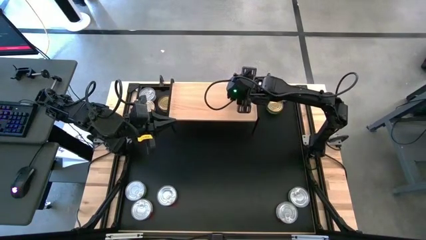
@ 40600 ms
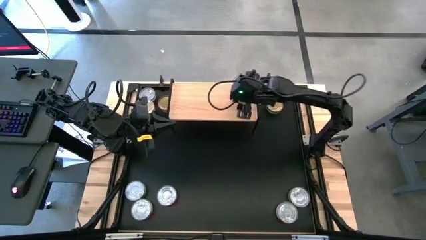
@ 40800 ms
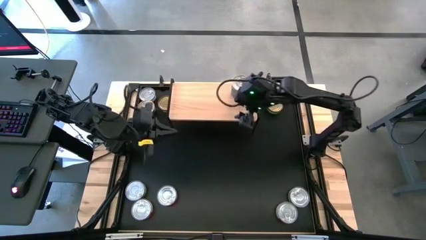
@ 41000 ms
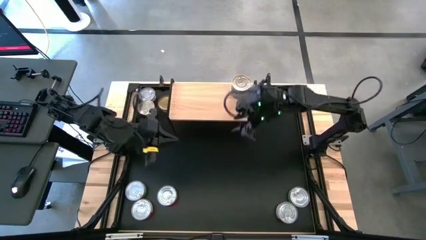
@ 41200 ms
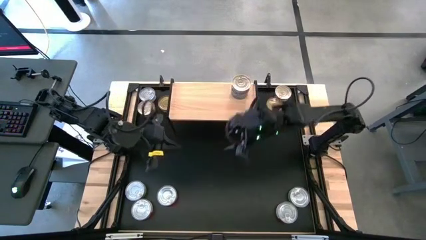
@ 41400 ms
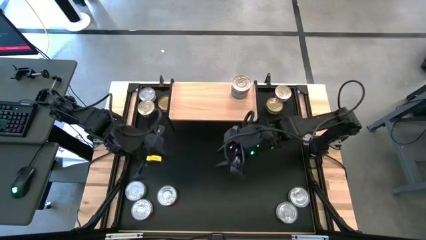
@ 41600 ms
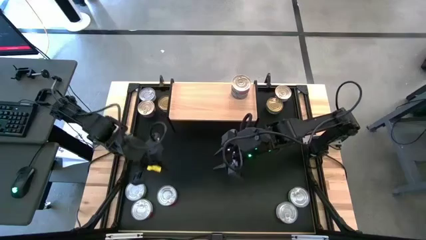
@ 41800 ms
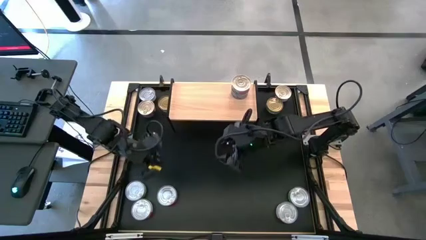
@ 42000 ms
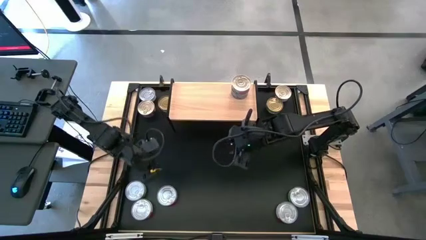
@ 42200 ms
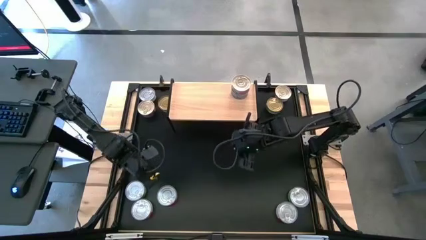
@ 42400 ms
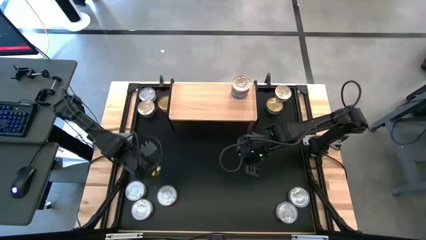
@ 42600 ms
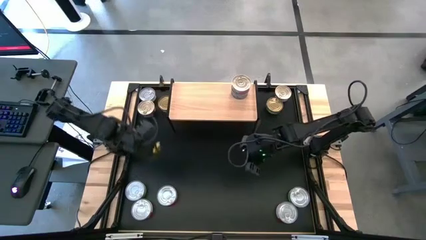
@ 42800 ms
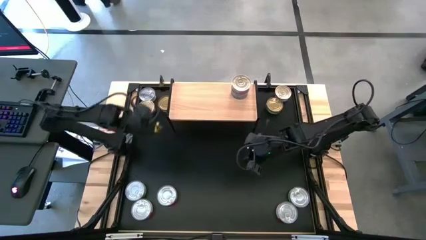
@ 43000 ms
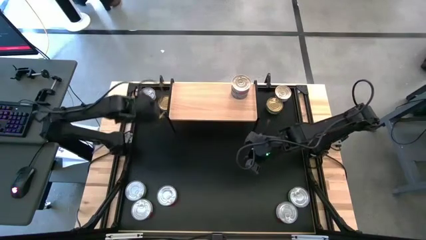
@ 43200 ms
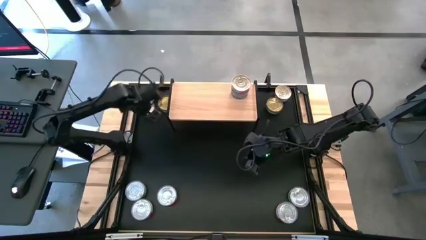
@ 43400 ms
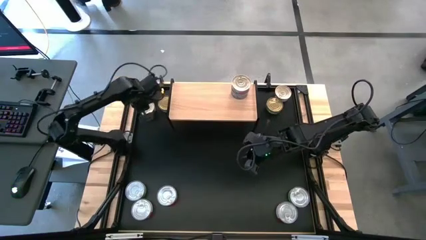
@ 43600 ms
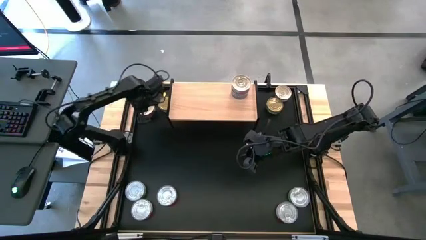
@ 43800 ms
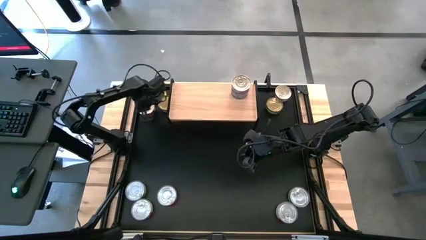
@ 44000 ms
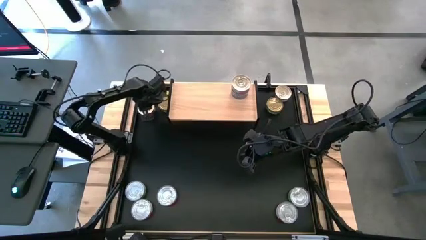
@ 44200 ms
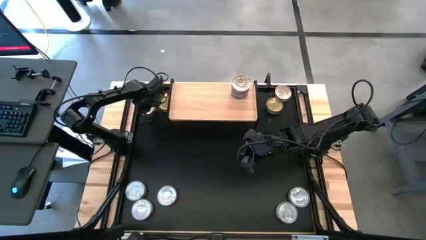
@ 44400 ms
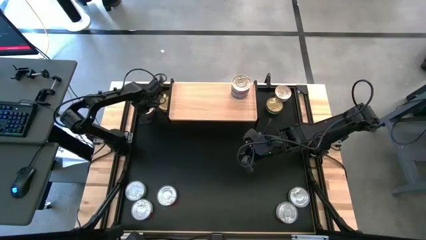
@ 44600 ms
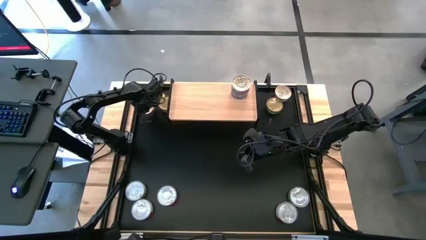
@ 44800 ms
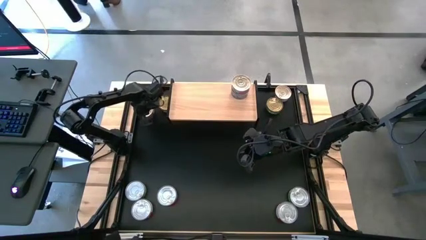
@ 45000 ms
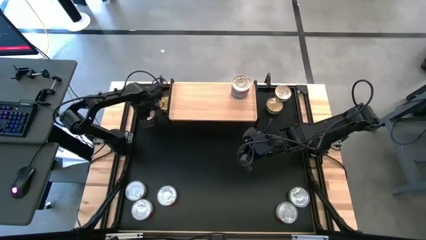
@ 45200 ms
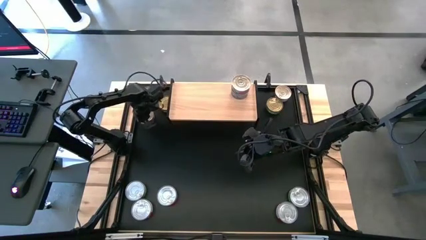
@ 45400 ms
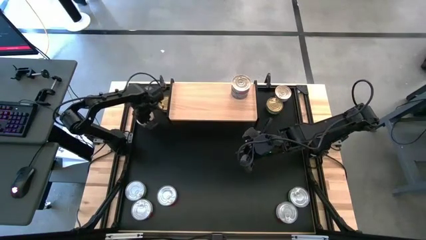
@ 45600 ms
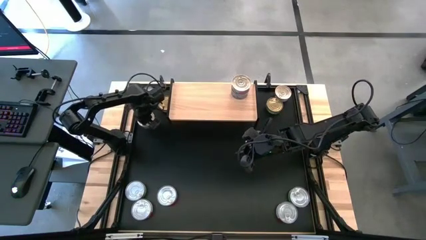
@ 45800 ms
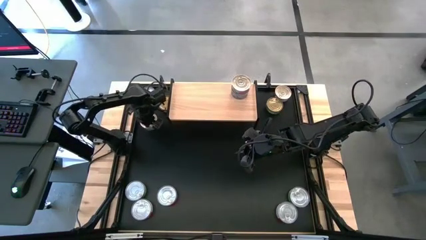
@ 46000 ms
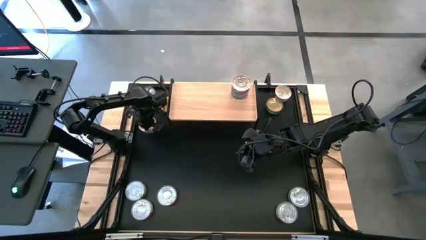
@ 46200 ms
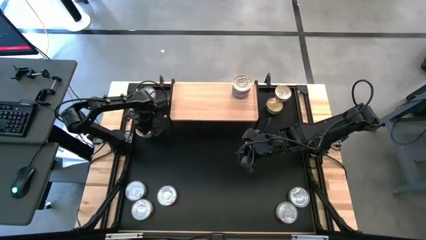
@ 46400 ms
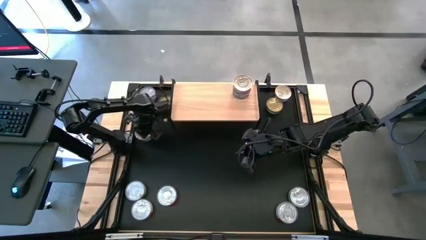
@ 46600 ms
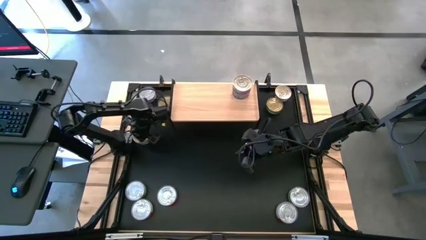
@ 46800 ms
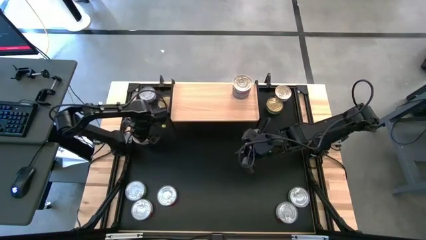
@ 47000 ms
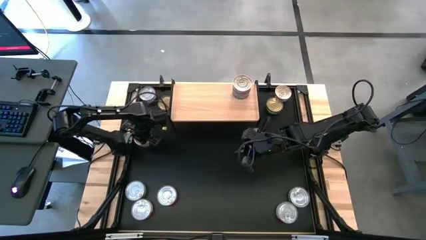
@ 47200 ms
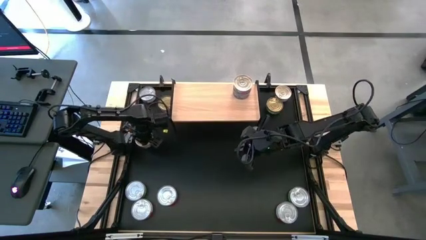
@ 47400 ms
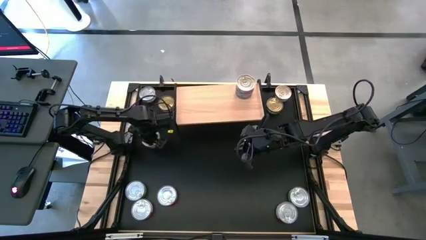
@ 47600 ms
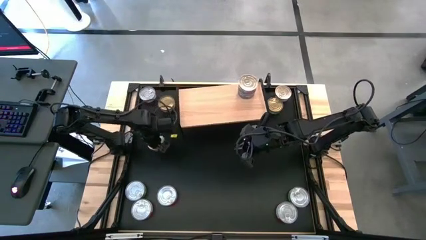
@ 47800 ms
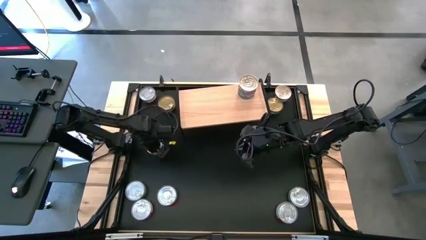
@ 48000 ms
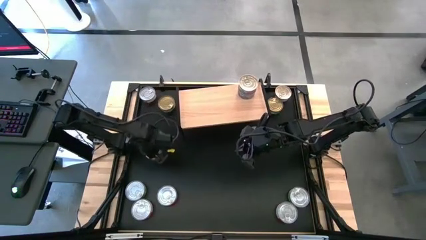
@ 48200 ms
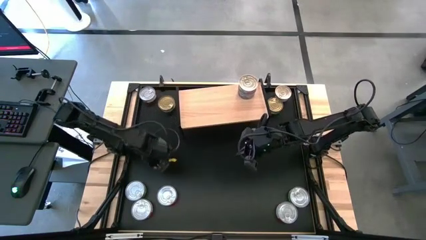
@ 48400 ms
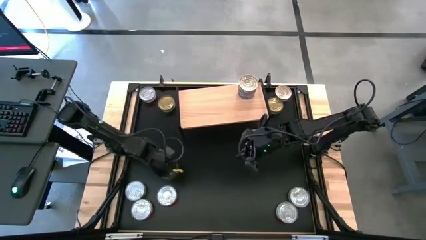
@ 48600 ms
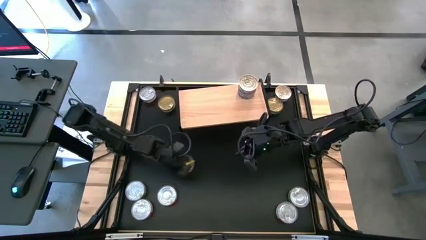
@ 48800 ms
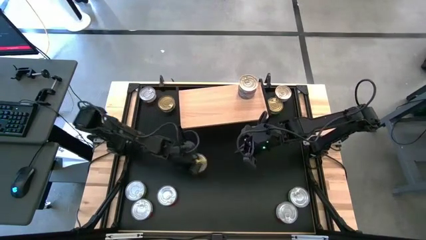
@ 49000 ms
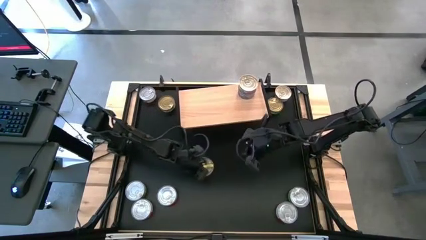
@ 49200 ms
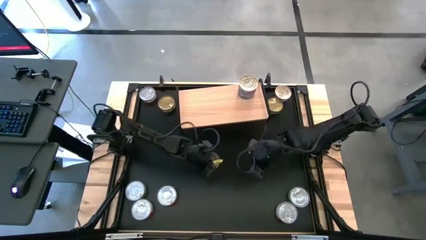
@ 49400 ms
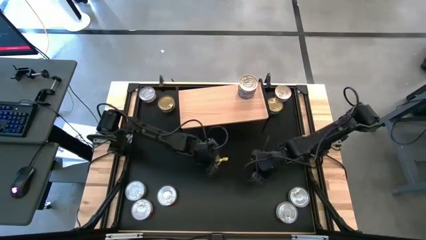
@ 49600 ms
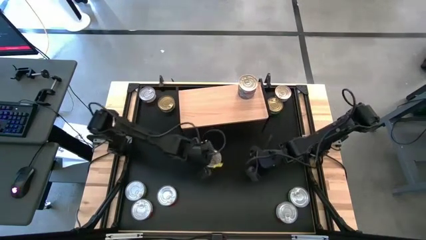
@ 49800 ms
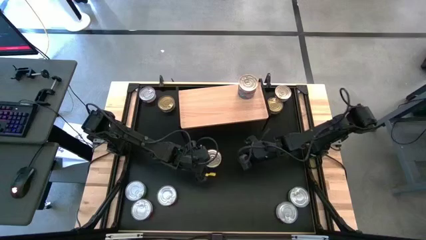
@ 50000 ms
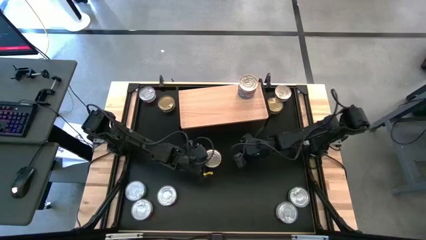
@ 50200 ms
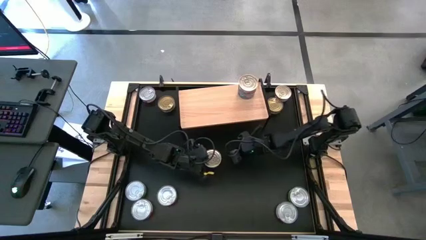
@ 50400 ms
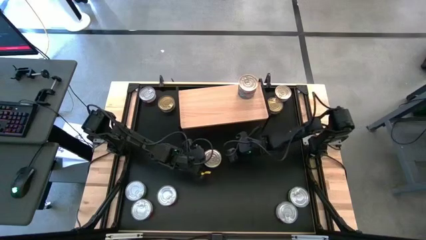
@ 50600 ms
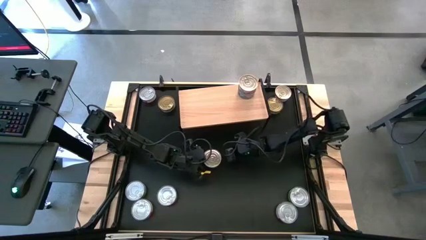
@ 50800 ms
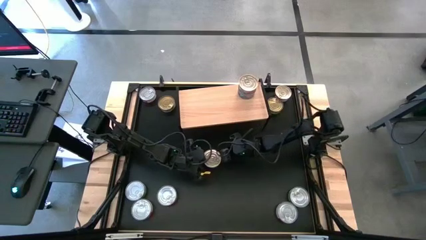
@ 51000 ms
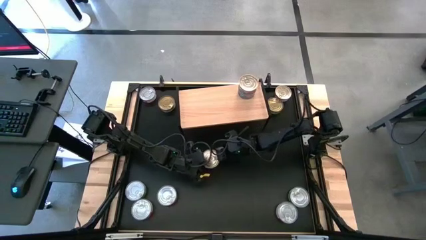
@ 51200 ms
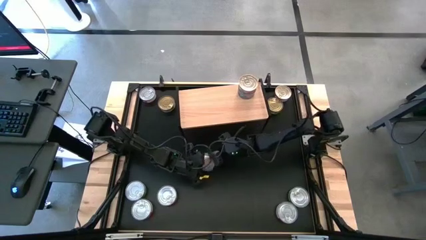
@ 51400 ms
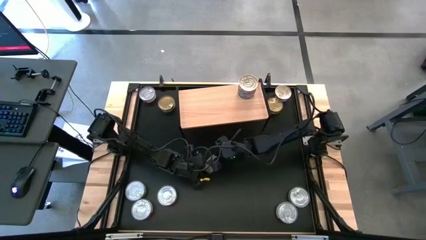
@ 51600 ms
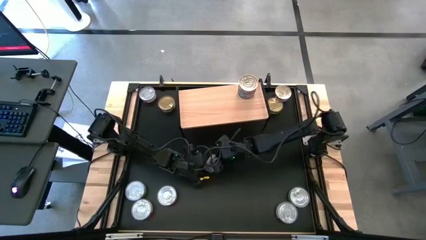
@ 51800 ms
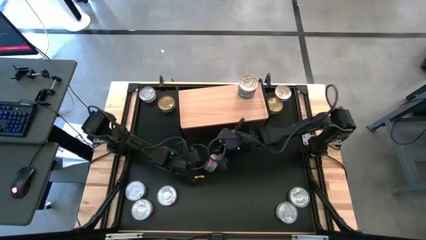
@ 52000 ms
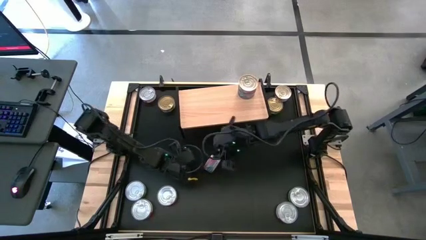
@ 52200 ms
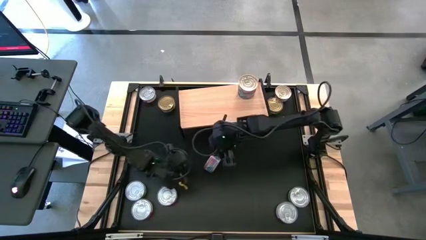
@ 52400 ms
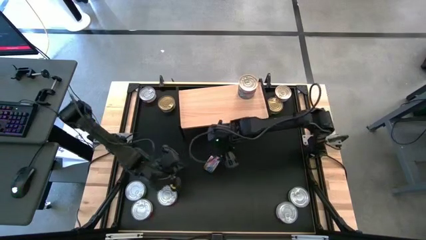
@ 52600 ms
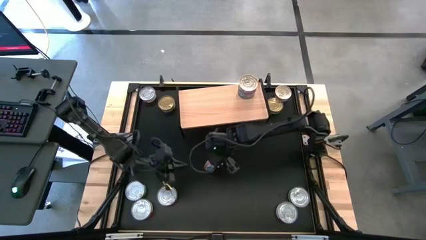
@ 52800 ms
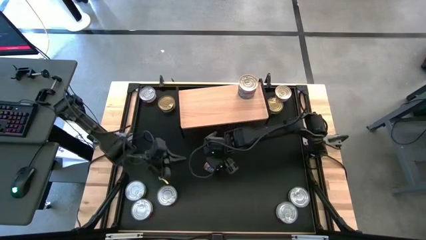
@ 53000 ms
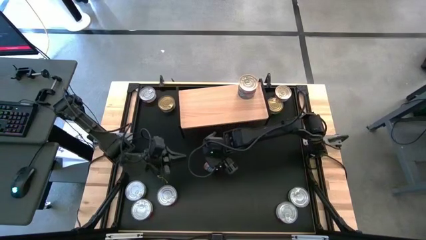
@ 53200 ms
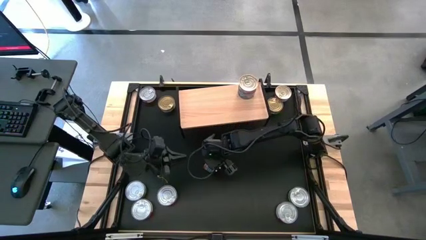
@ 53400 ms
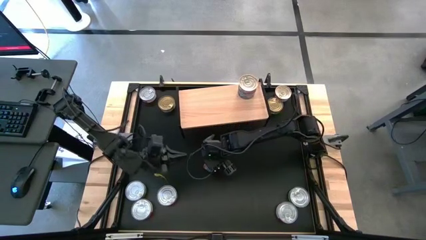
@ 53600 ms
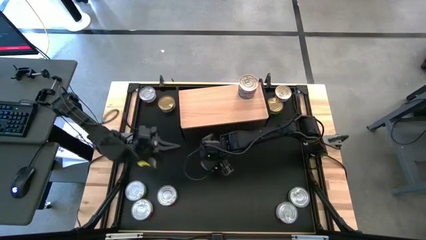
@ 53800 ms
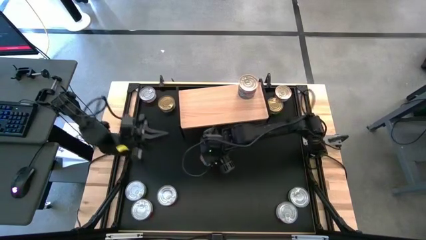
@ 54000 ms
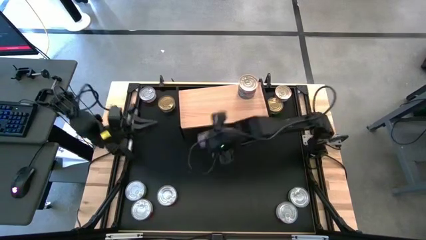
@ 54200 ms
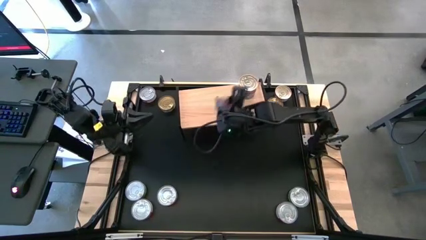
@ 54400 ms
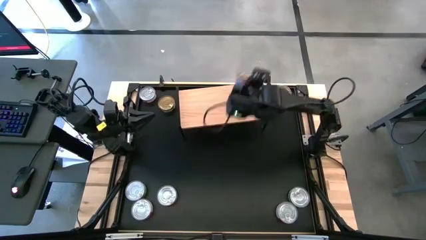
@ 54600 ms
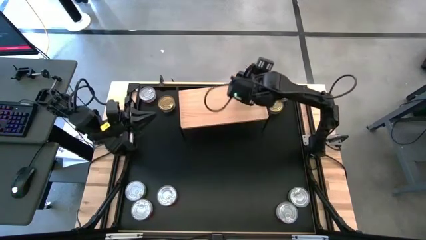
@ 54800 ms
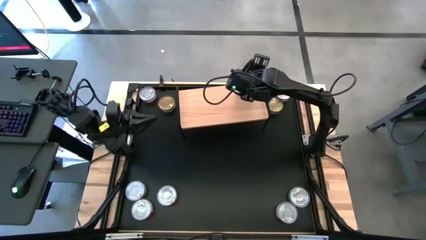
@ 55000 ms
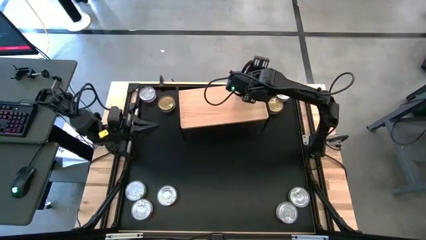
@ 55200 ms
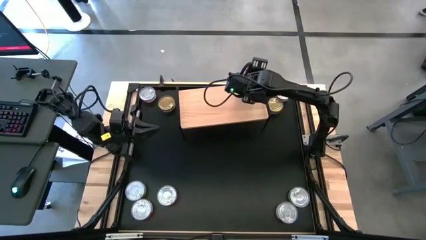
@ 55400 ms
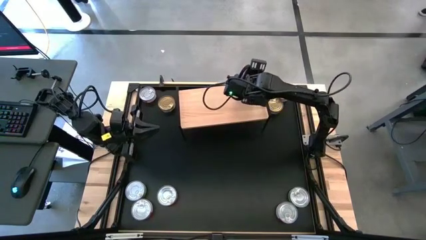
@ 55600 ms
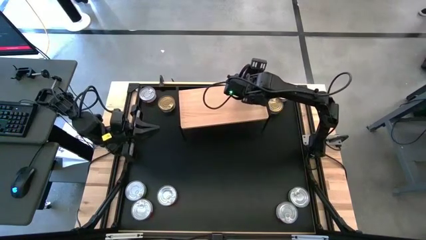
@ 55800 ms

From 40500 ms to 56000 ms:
Task: Stack canned seafood by type on shelf
Stack the blue and pink tuna can on top of the blue and pink tuna can on the shelf
